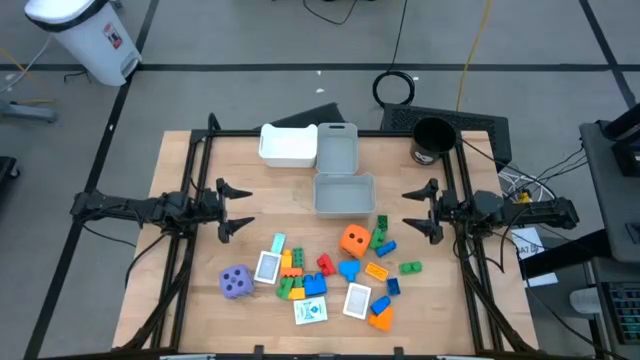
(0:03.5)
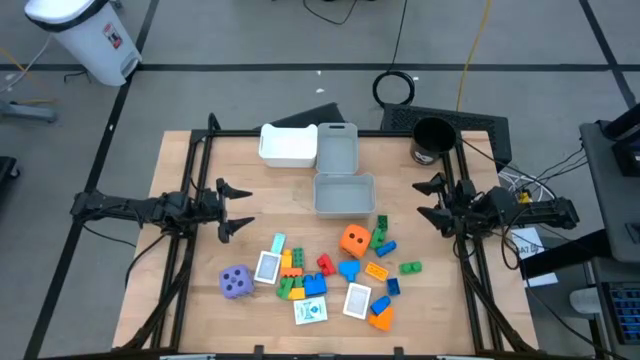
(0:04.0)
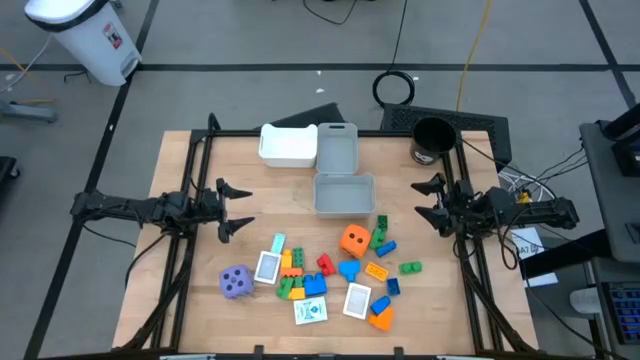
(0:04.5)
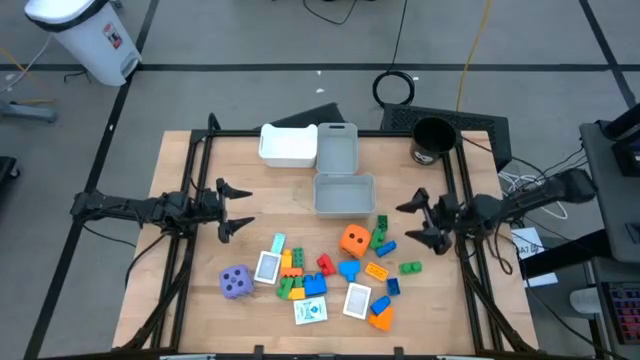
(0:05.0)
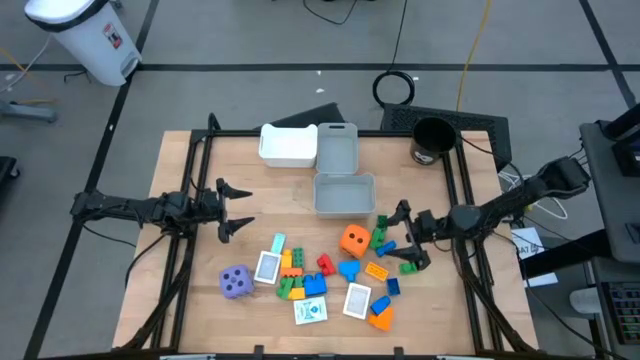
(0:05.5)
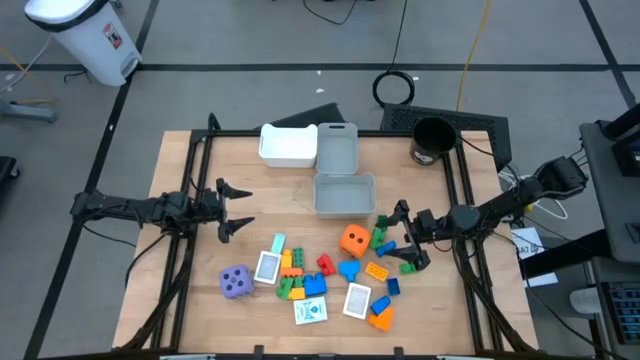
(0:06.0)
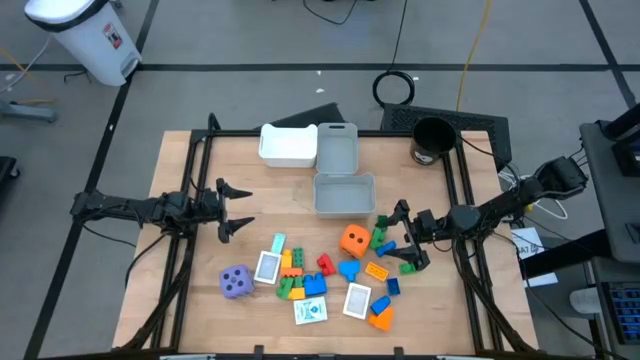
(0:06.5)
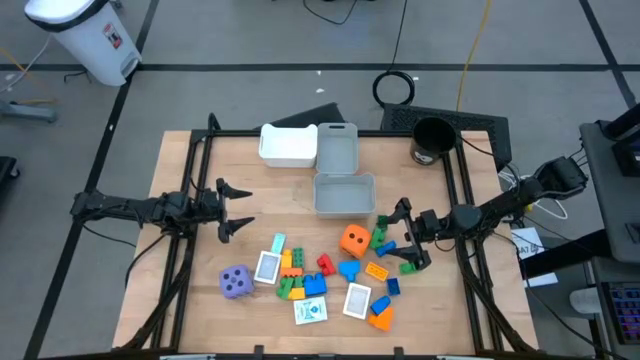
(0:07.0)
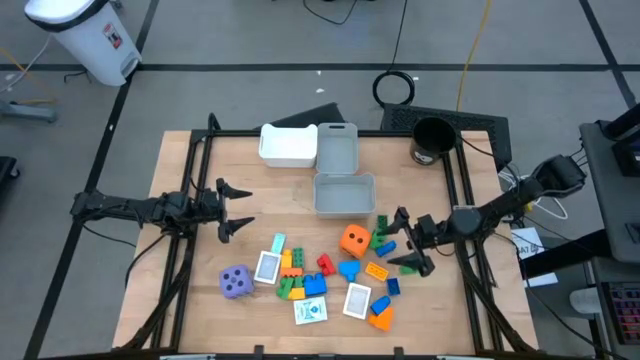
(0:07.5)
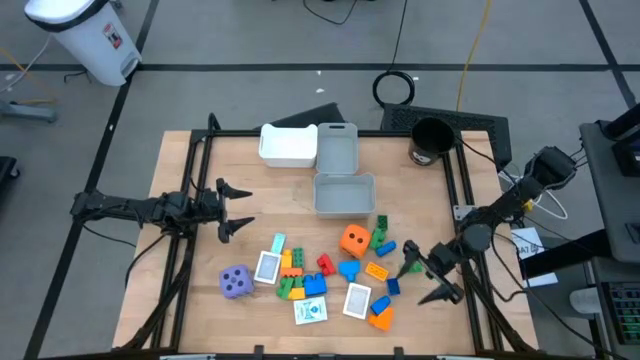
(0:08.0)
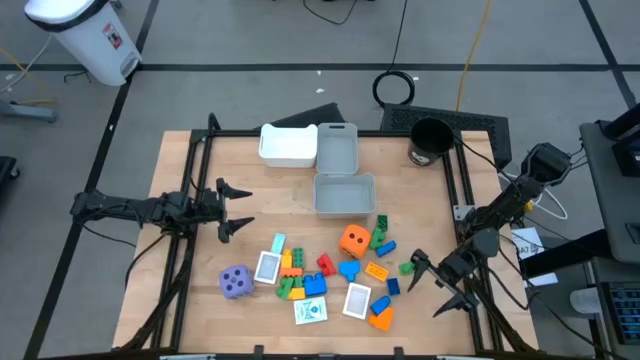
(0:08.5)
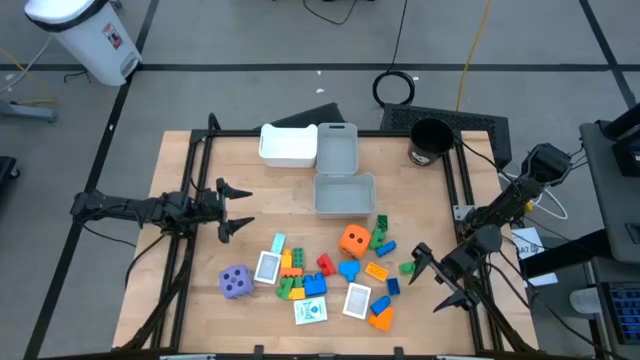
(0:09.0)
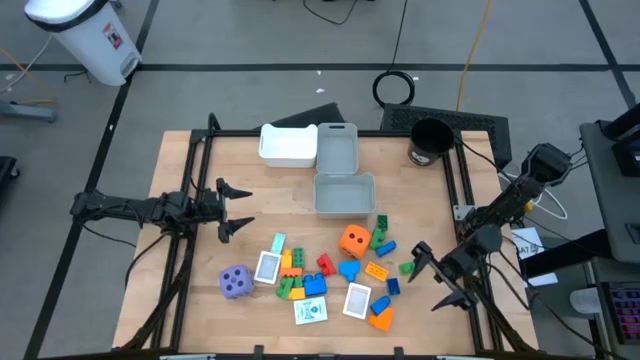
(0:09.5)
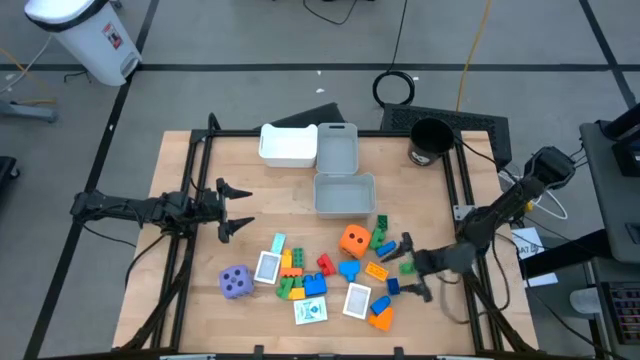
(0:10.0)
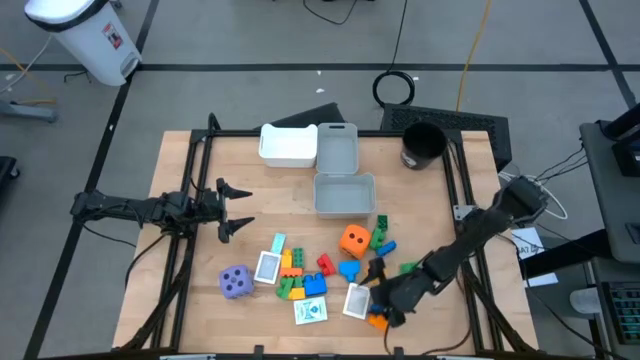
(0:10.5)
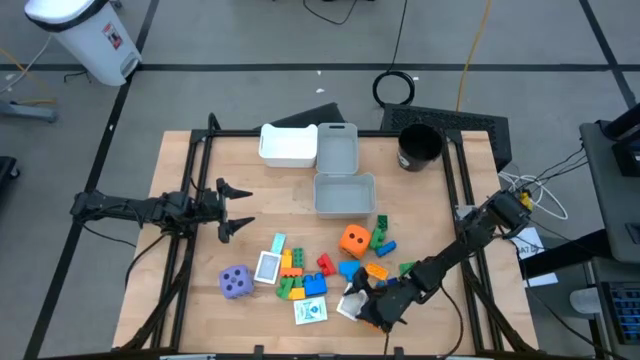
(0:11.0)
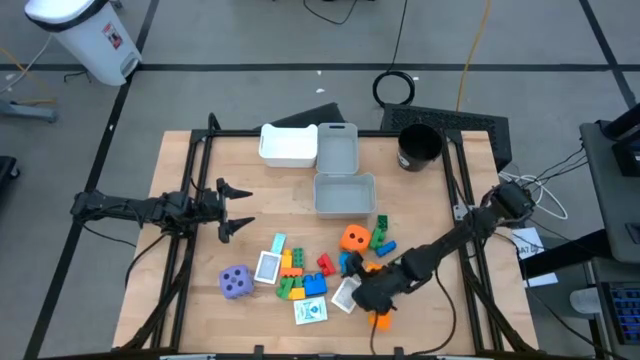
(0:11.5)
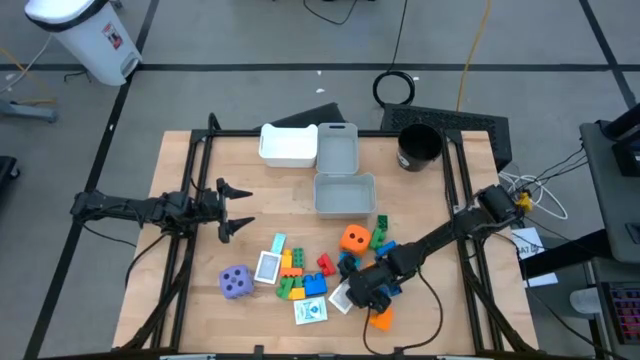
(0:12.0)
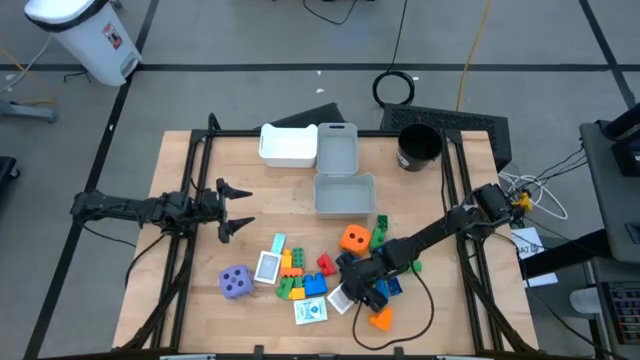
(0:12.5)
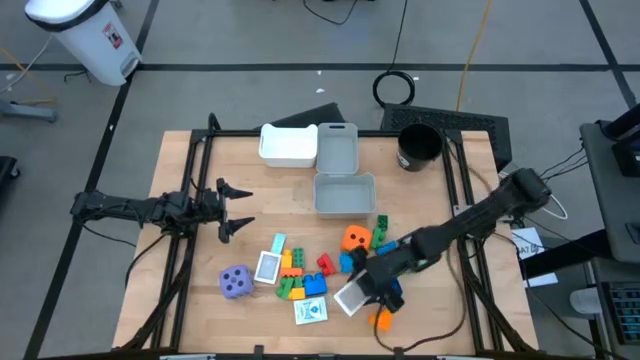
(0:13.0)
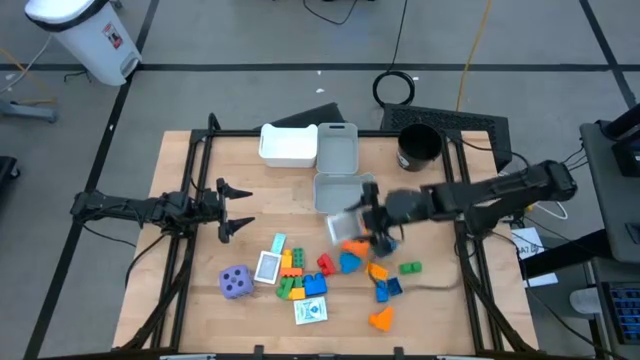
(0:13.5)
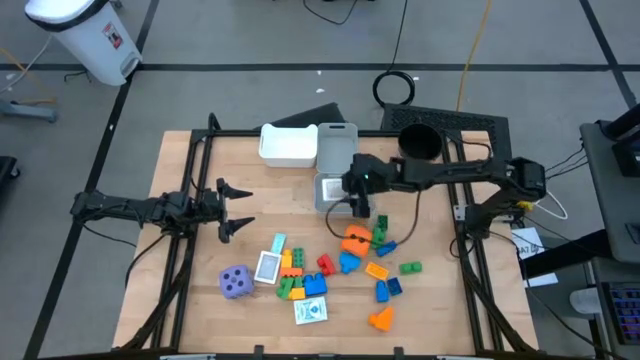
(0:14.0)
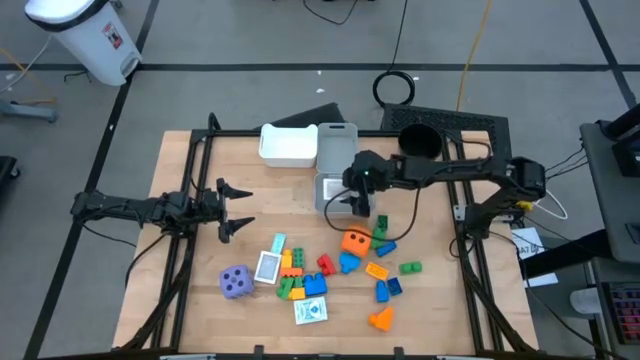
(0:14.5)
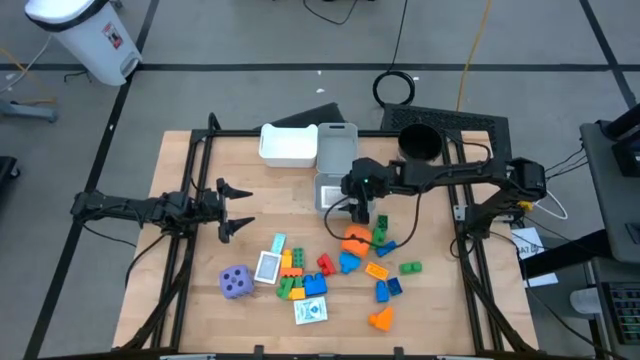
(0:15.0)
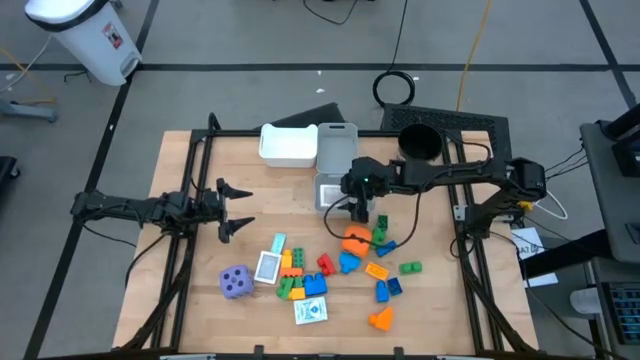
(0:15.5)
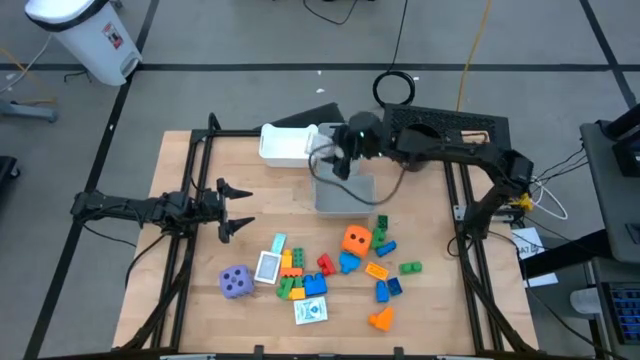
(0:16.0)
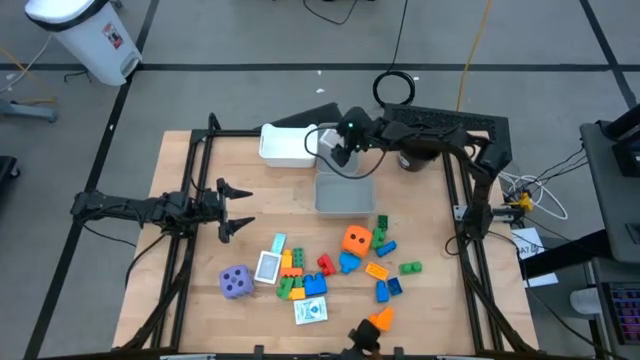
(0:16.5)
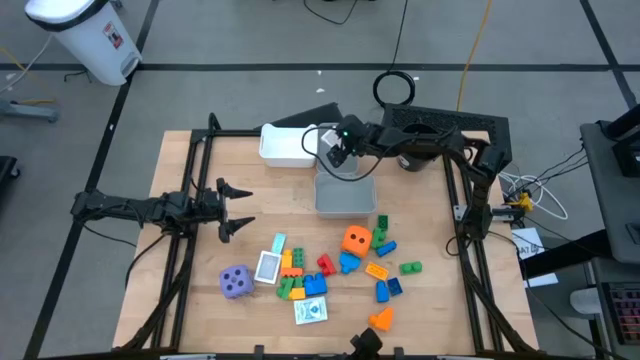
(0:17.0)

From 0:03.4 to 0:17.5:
Task: Pick & Place Toys
Put the brown playing card box into the top gray bin

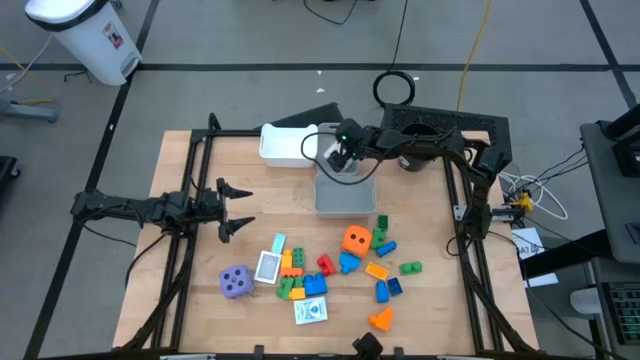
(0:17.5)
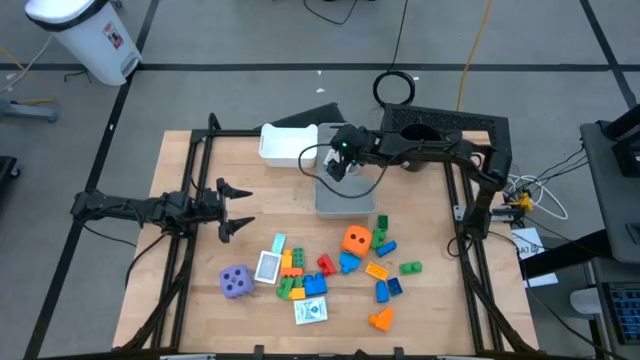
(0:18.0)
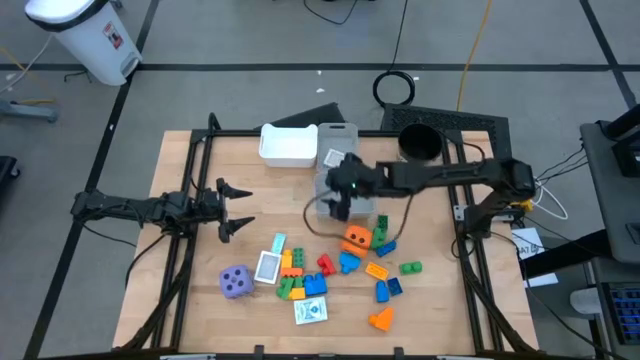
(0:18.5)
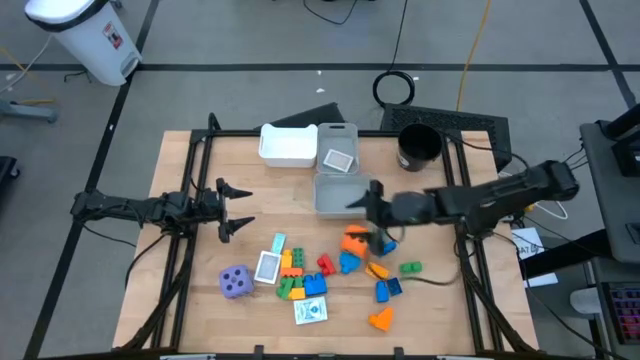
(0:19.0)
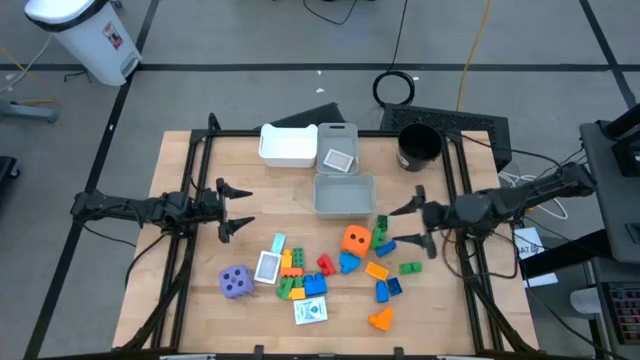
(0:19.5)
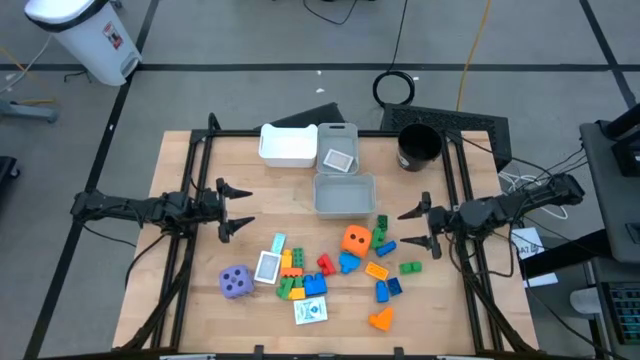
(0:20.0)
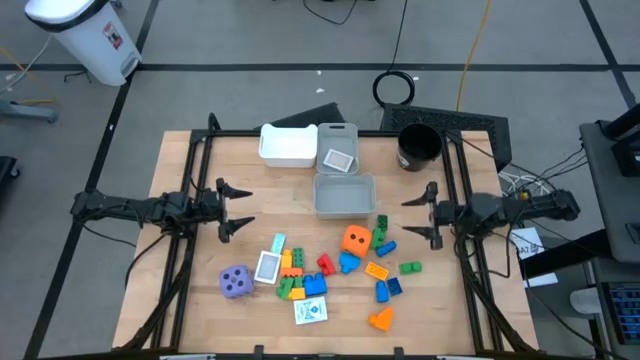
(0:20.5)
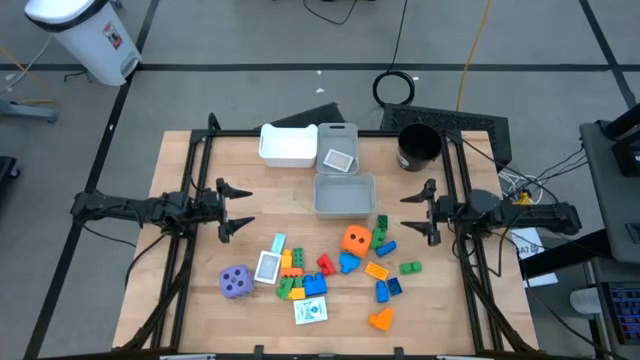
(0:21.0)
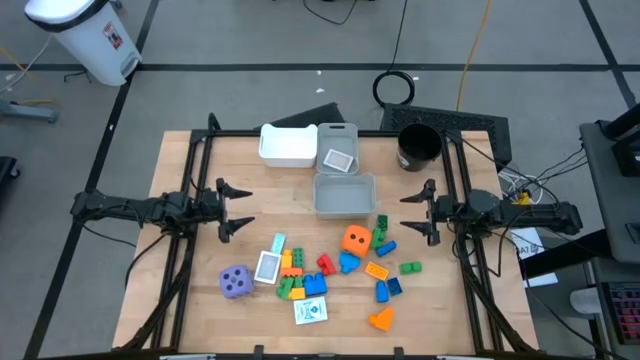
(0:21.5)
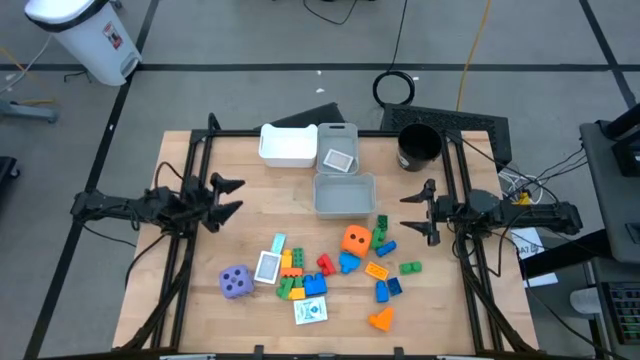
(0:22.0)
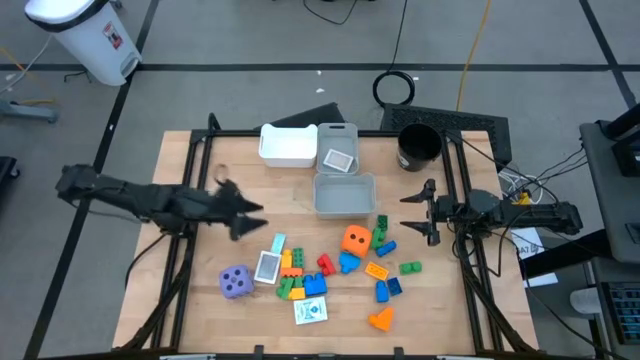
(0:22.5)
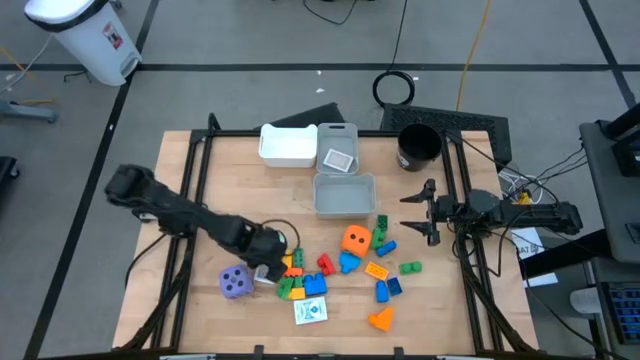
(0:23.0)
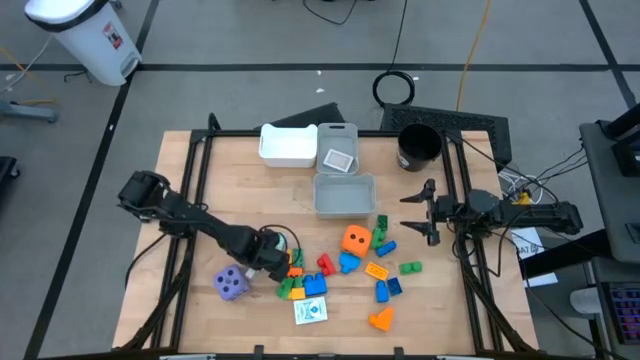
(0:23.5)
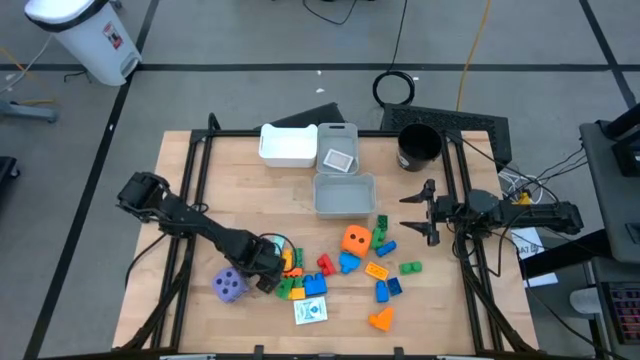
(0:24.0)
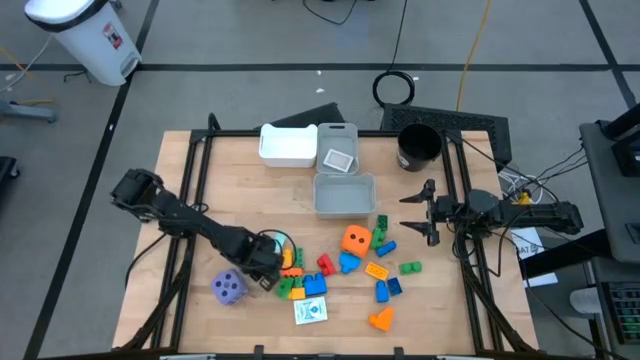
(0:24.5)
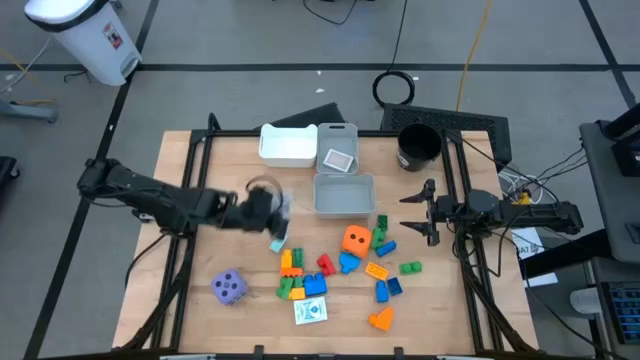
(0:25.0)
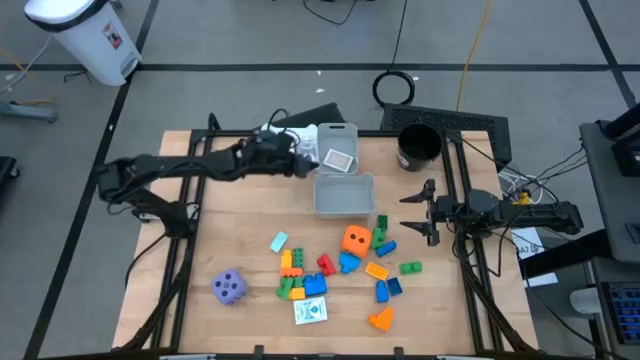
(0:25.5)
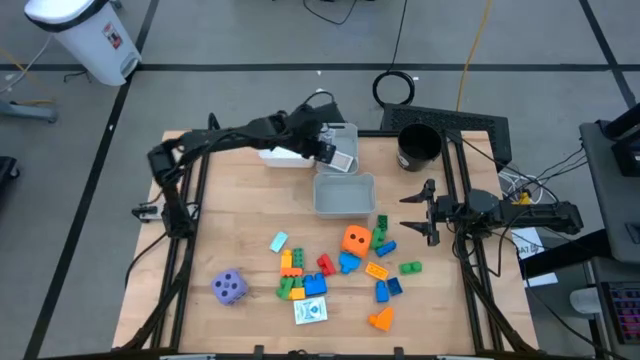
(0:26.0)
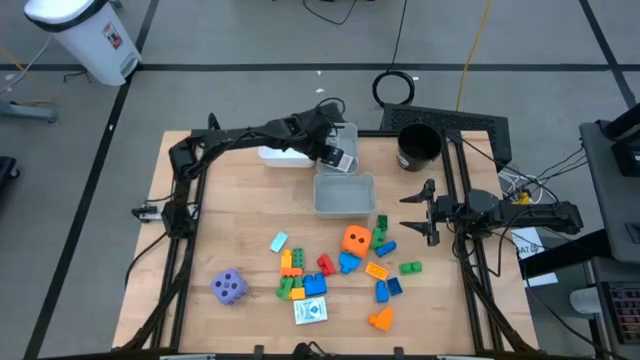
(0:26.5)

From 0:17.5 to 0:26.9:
Put the black playing card box into the top gray bin
